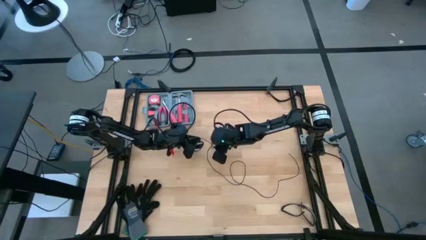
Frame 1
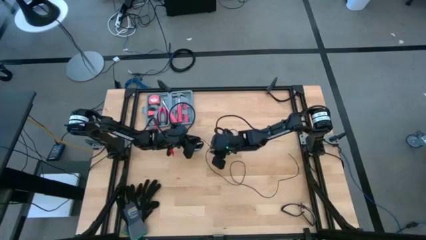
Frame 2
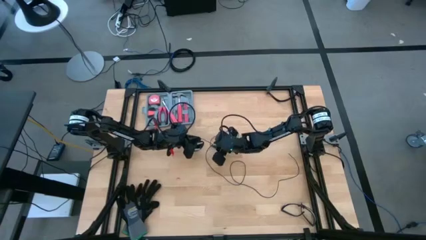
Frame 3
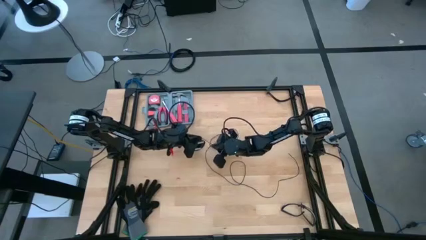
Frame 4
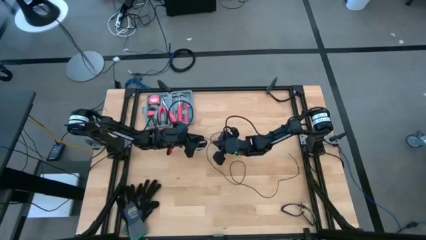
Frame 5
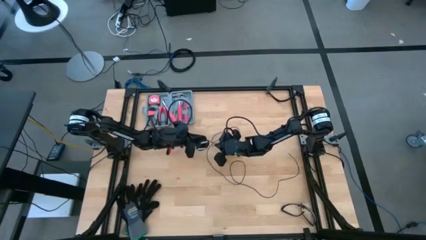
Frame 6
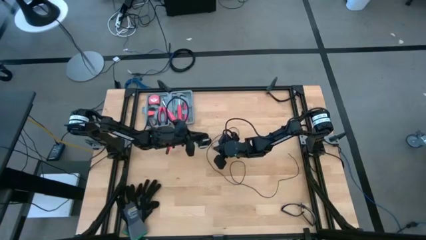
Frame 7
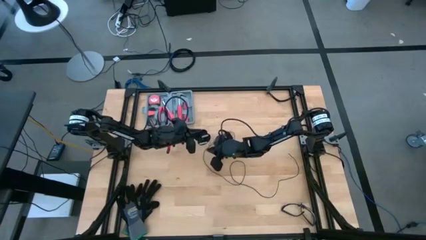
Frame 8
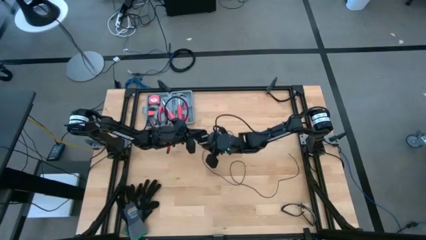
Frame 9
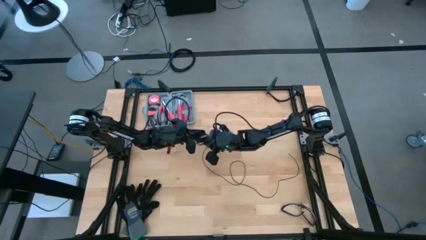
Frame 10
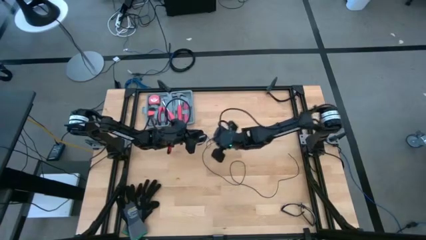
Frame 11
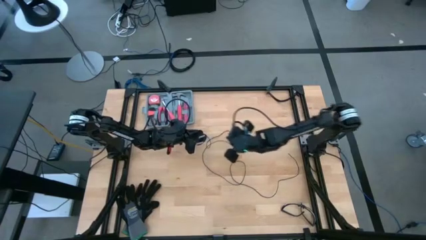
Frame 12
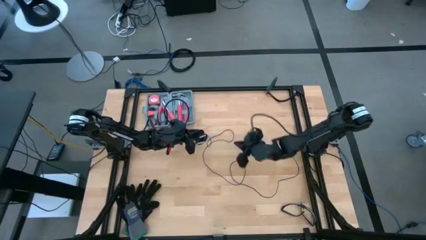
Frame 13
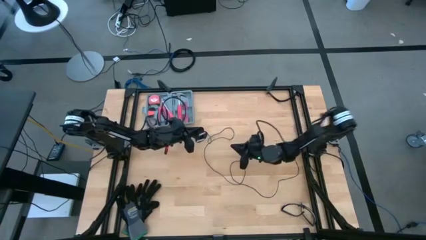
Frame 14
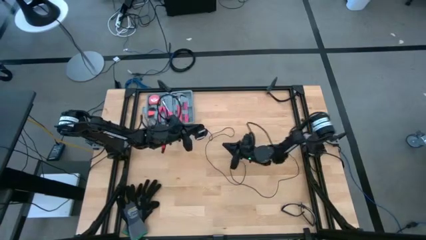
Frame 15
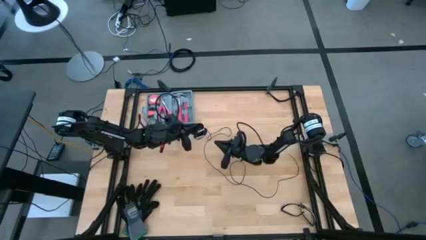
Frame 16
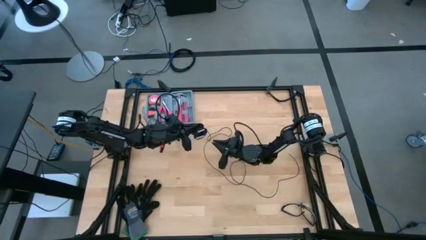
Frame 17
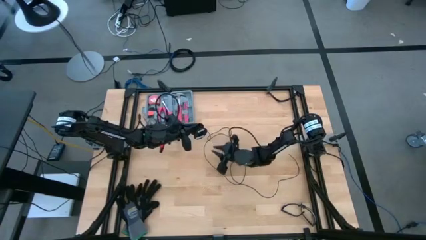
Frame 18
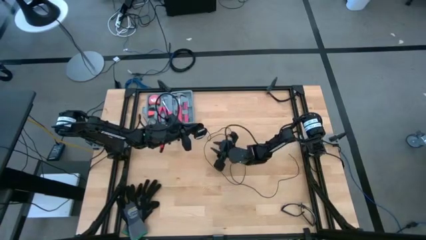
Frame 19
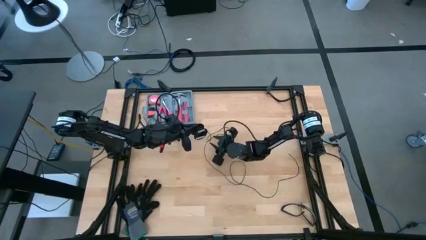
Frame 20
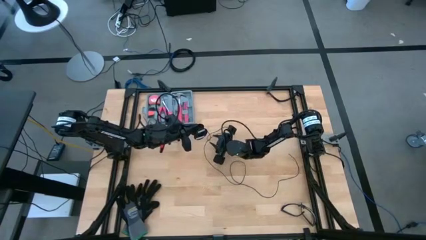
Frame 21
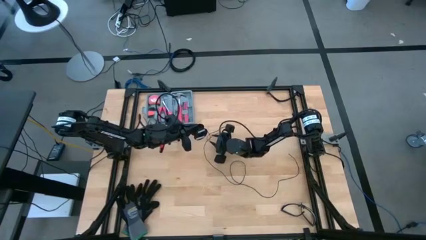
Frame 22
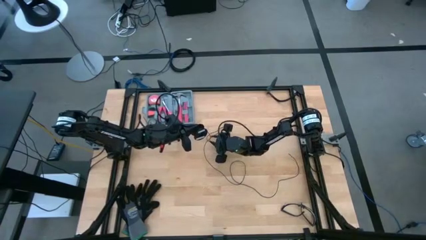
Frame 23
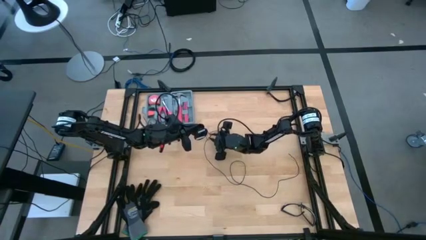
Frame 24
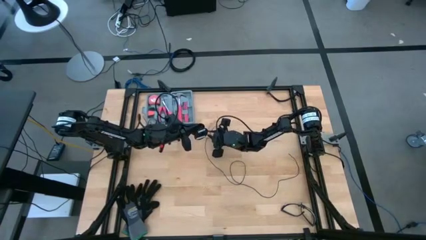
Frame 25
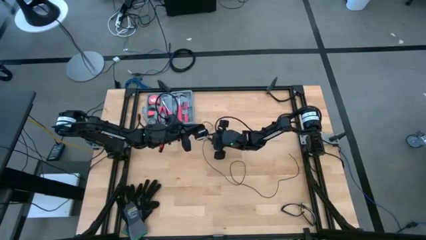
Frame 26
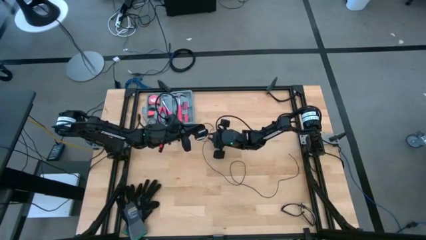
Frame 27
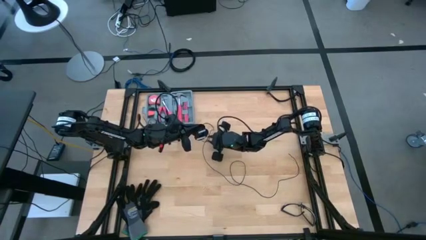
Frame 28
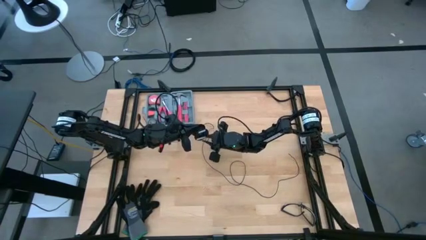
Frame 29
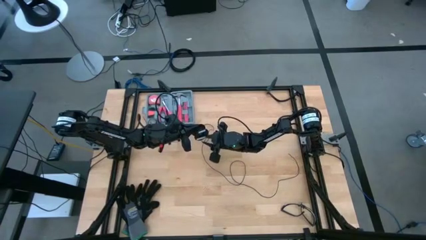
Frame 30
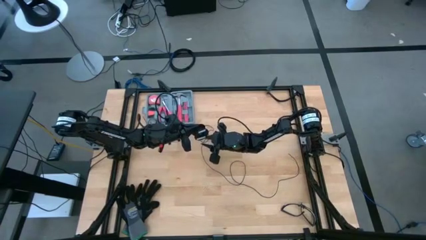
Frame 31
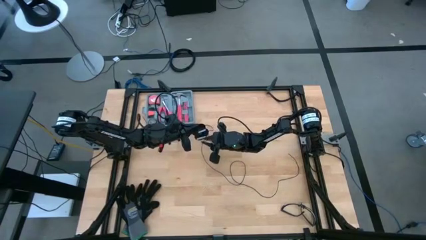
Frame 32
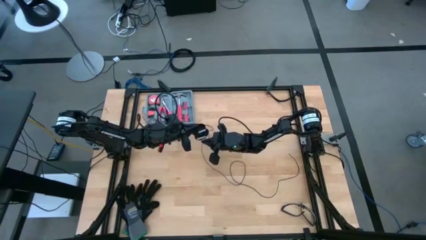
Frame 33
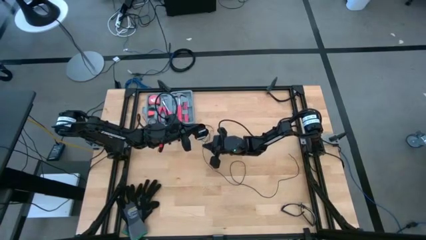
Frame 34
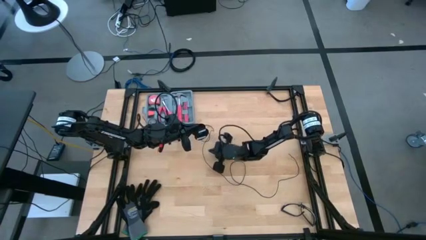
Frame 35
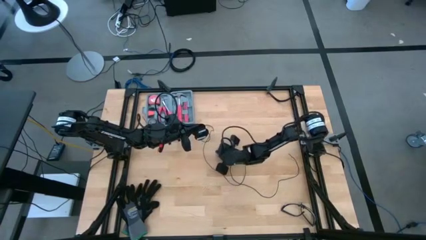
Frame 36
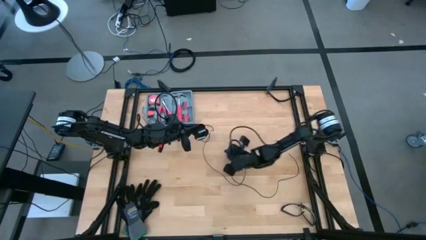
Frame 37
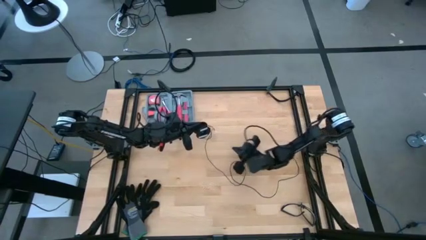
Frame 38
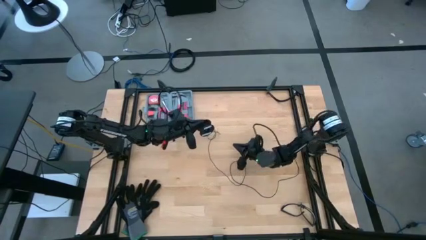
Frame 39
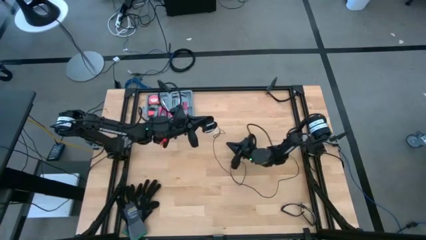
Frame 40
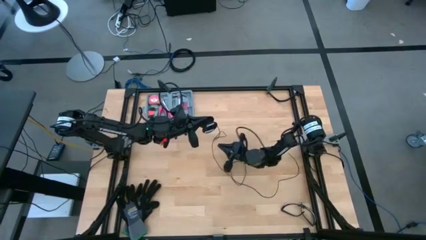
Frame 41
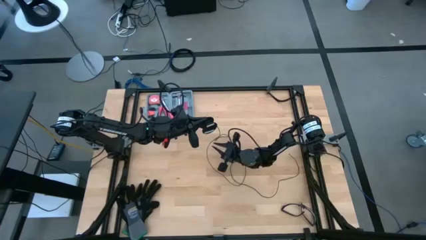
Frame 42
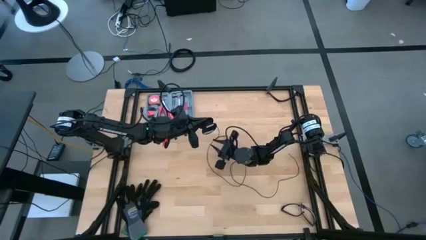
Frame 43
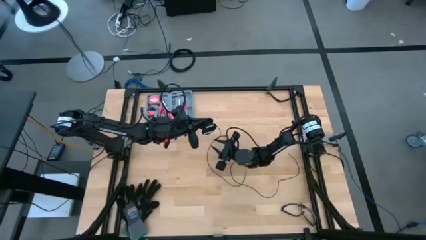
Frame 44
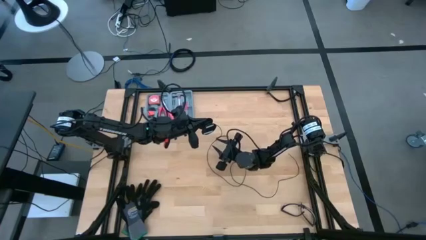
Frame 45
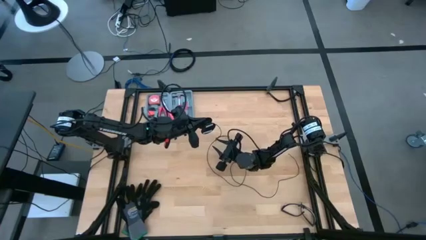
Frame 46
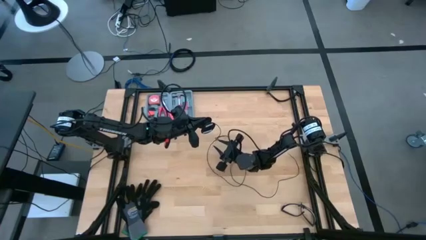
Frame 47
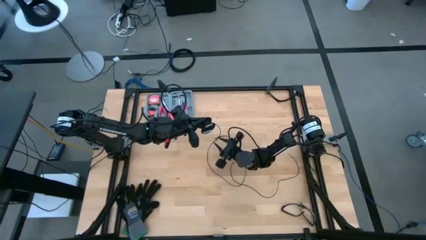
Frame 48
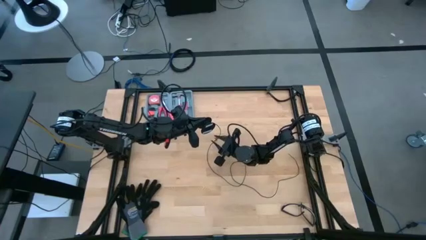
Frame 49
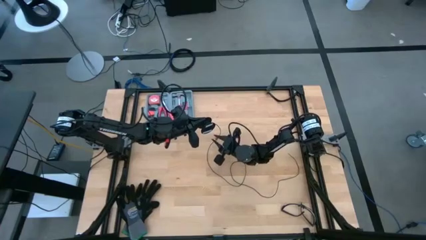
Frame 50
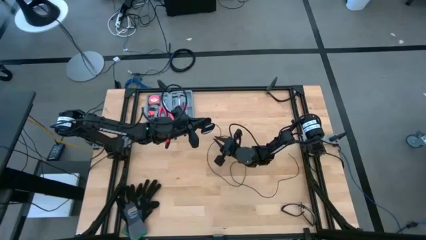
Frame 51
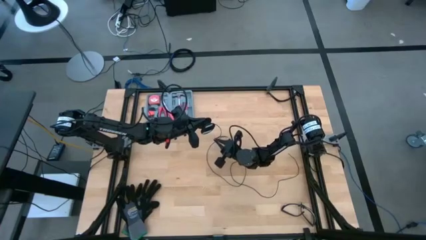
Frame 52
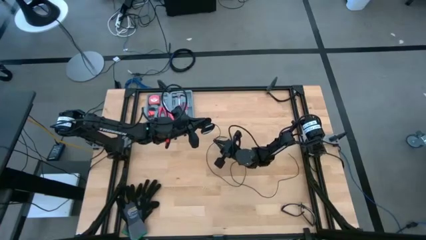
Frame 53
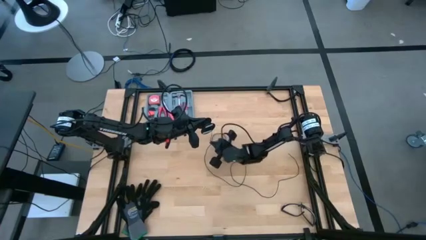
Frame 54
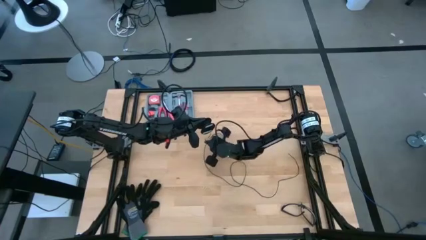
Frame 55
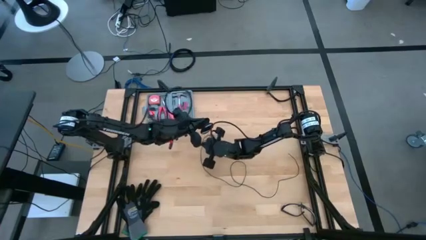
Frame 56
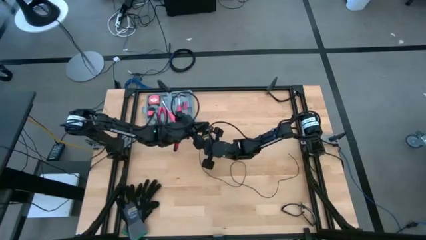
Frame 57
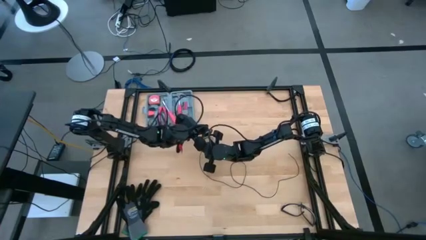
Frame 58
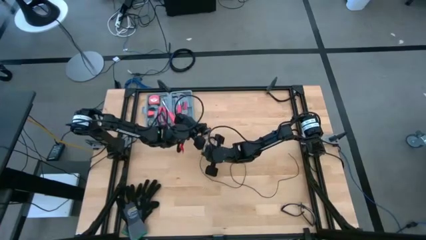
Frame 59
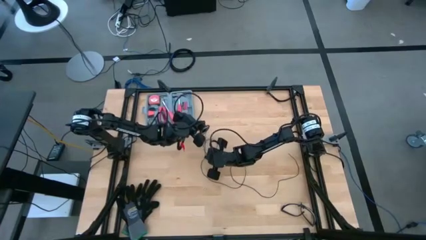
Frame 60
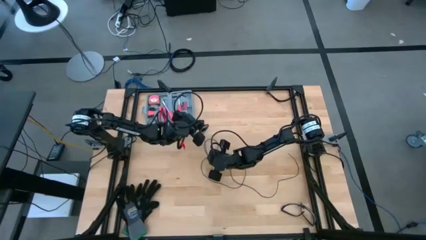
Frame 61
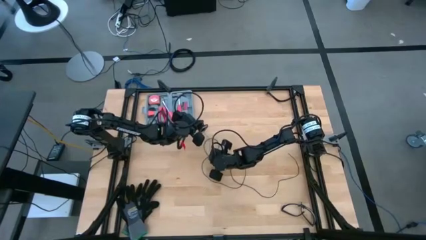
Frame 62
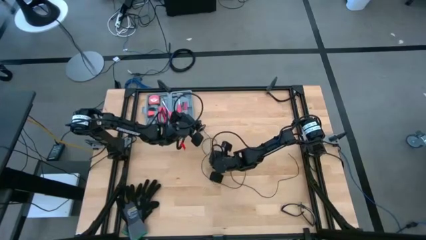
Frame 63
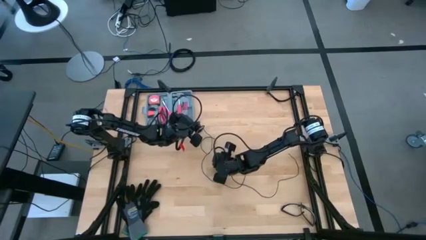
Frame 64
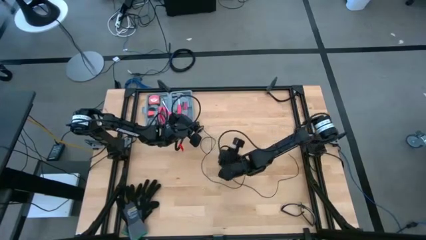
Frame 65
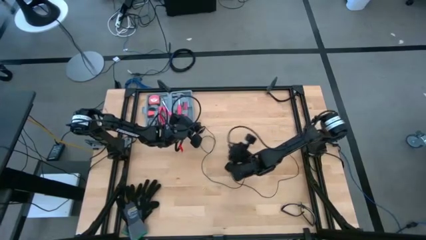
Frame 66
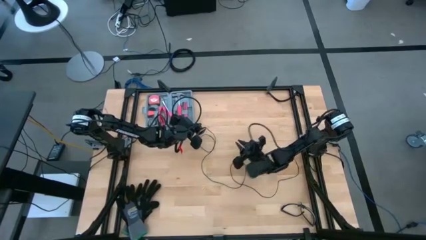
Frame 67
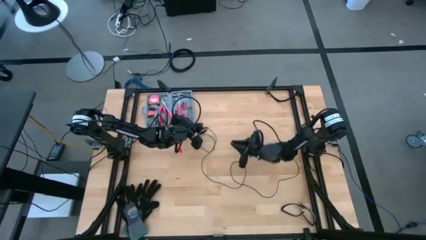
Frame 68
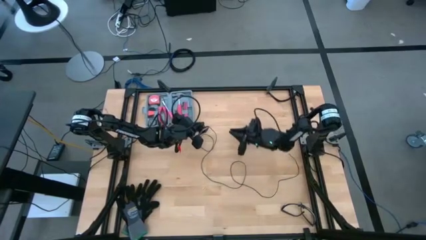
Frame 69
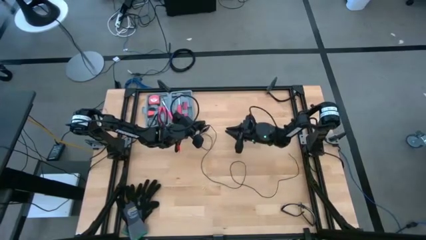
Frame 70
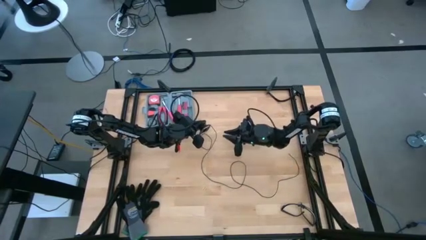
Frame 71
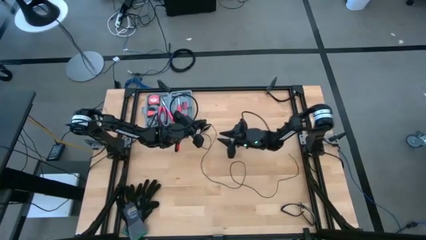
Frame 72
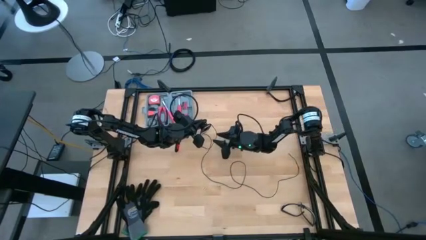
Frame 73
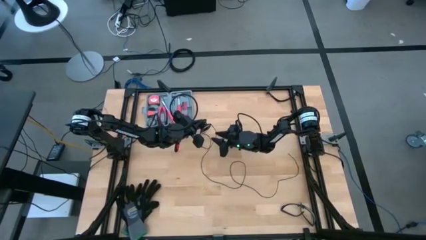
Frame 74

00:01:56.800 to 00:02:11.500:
Task: Coil cords
Coil the black wire onto the spool

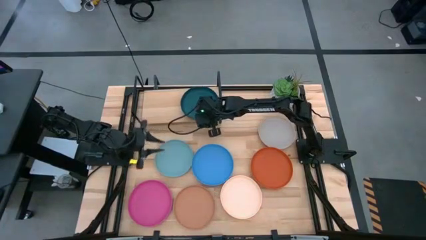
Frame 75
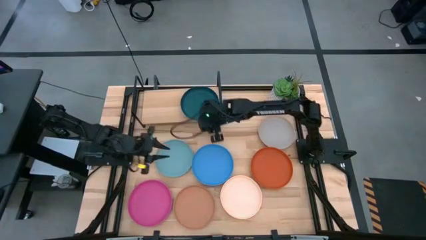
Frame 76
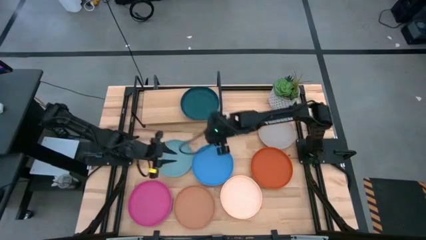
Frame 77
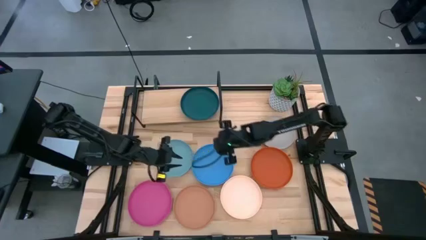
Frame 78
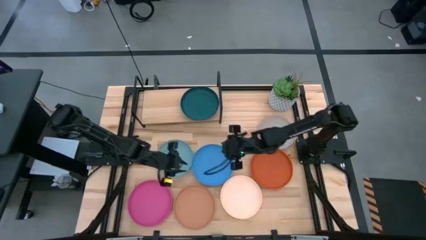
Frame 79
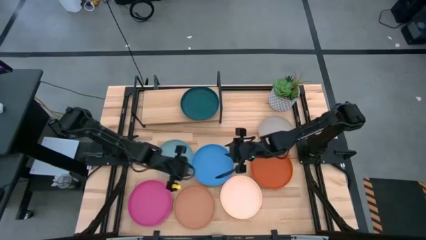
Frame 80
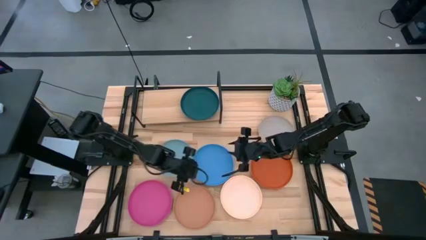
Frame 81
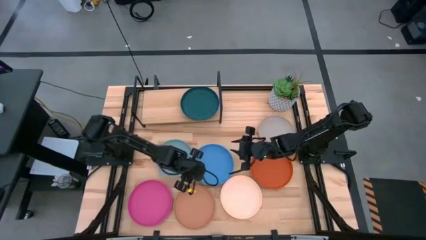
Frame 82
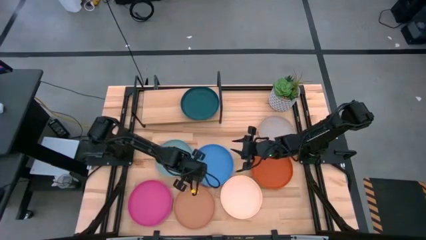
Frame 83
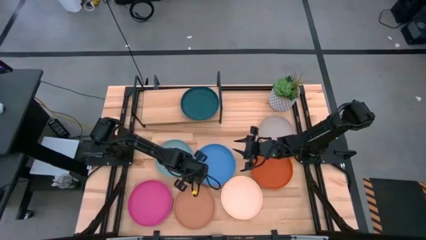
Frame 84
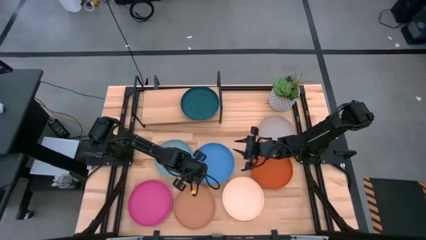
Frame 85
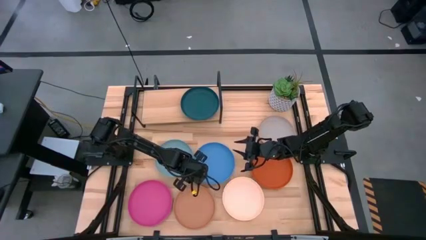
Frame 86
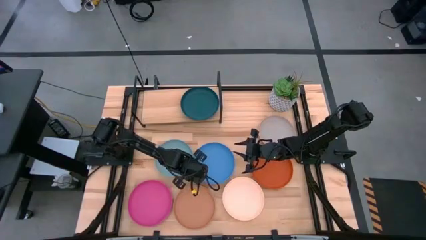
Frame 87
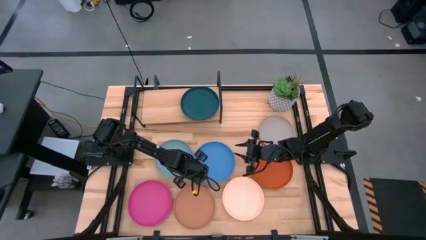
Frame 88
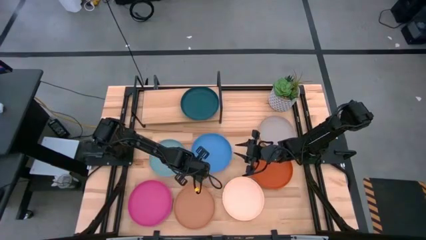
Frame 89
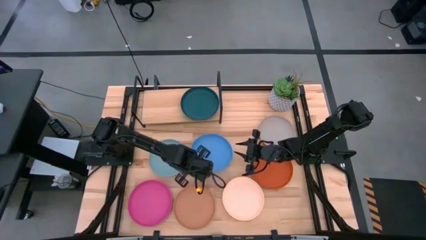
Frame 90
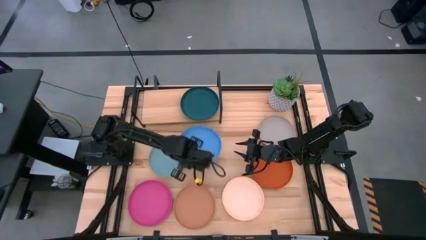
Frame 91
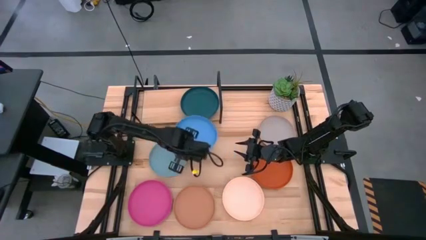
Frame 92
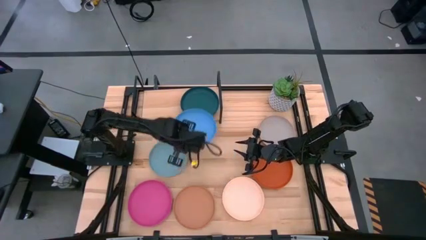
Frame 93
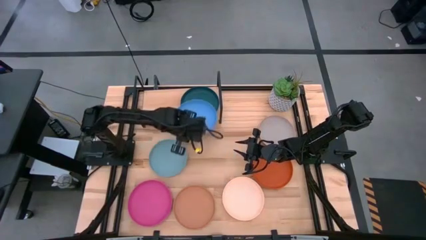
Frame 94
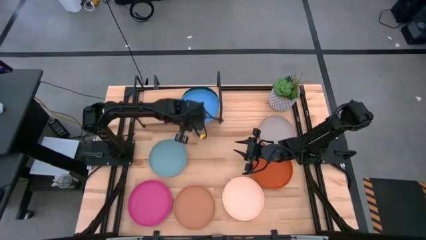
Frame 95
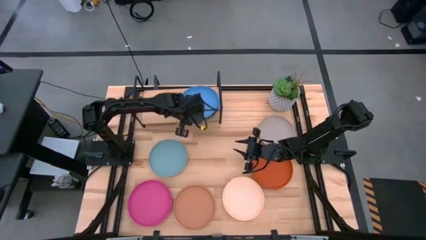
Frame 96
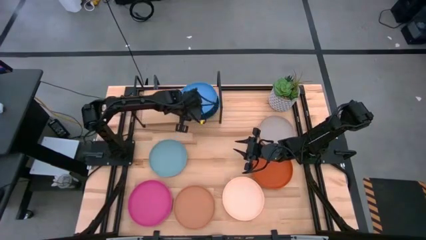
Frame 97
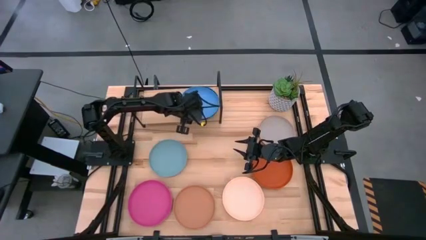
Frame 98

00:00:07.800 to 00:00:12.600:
Task: Place and stack plates onto a shelf
Stack the blue plate on top of the blue green plate on the shelf
